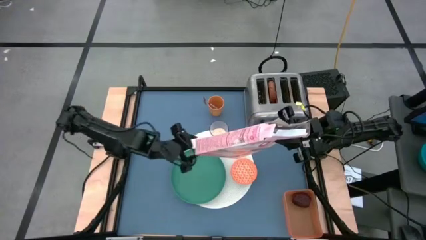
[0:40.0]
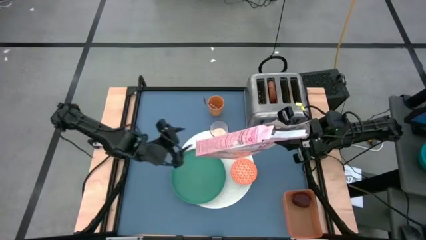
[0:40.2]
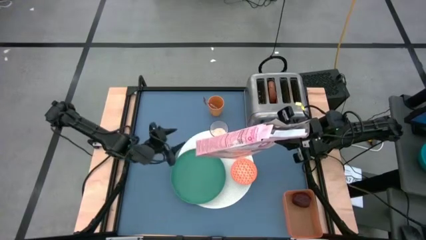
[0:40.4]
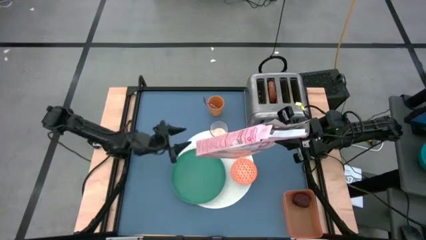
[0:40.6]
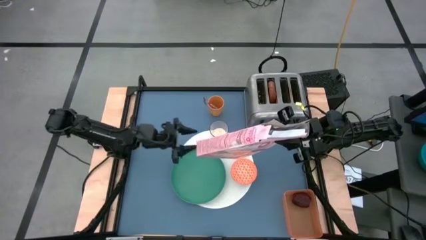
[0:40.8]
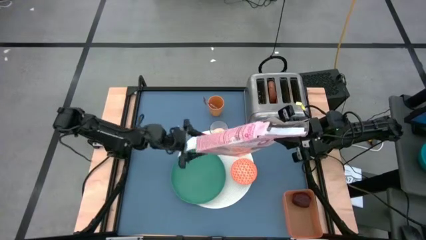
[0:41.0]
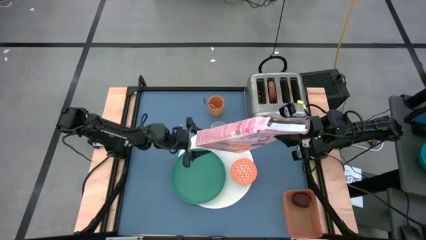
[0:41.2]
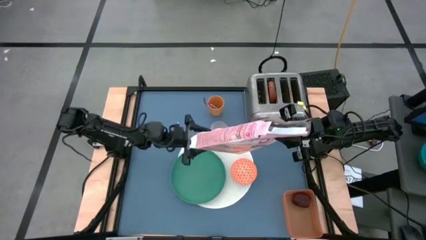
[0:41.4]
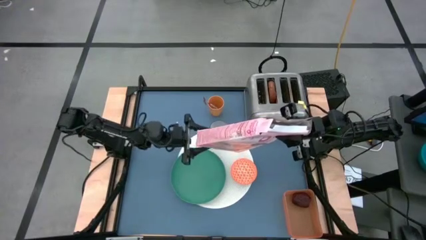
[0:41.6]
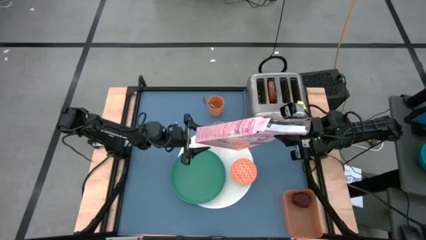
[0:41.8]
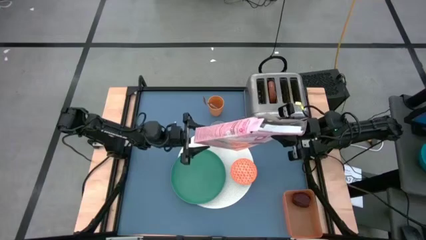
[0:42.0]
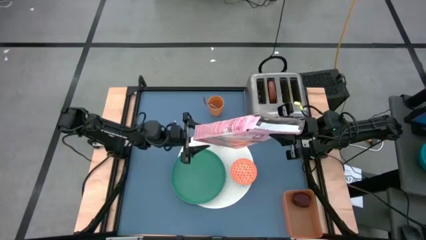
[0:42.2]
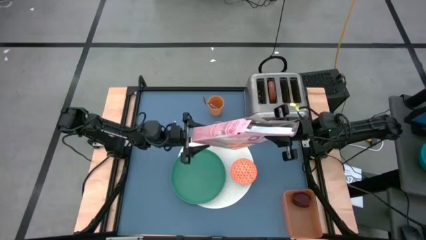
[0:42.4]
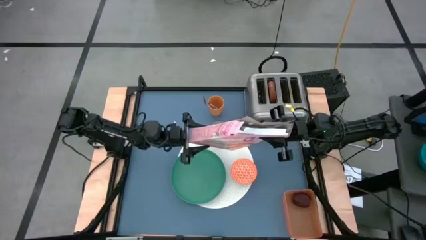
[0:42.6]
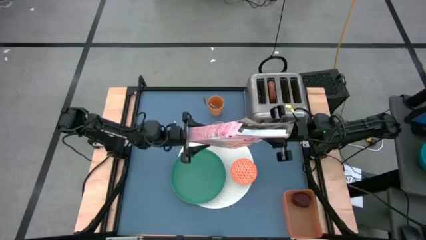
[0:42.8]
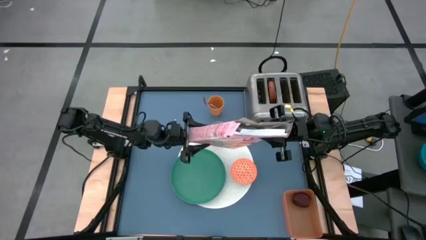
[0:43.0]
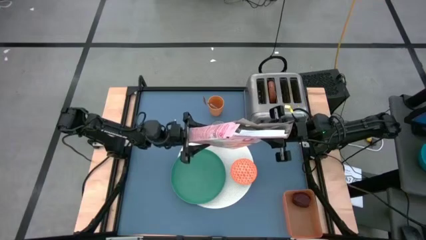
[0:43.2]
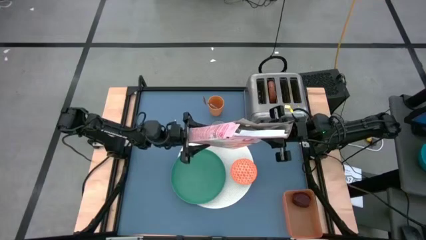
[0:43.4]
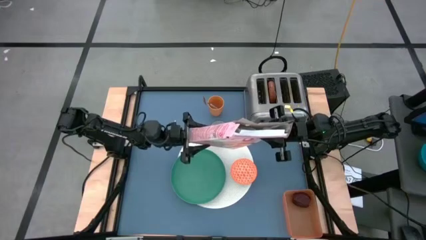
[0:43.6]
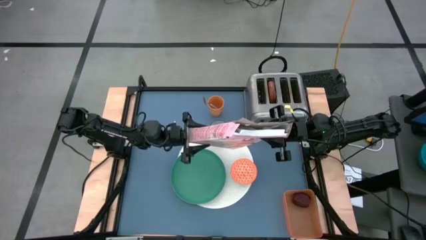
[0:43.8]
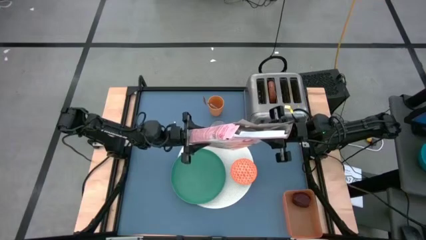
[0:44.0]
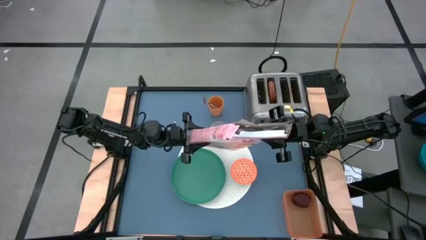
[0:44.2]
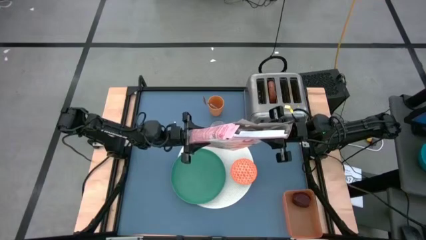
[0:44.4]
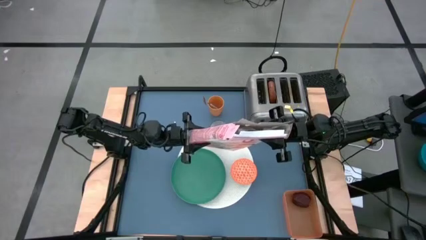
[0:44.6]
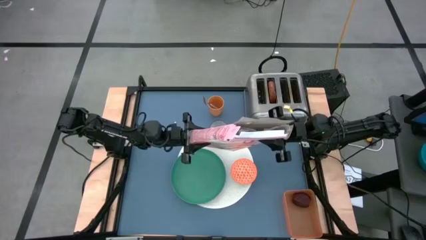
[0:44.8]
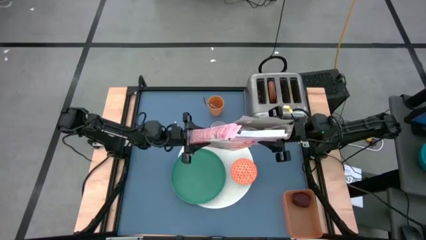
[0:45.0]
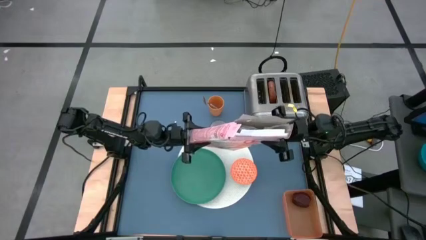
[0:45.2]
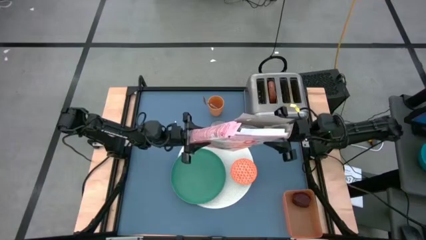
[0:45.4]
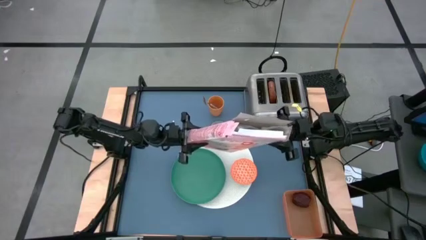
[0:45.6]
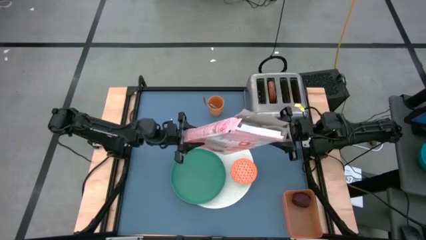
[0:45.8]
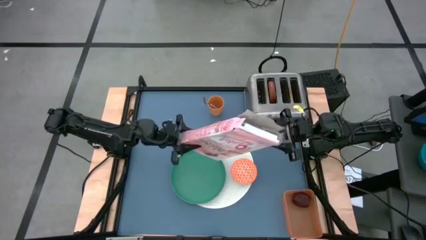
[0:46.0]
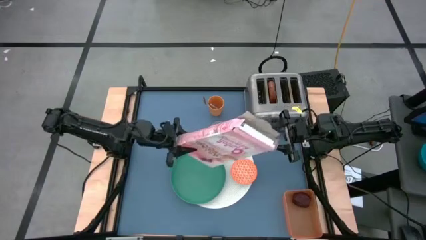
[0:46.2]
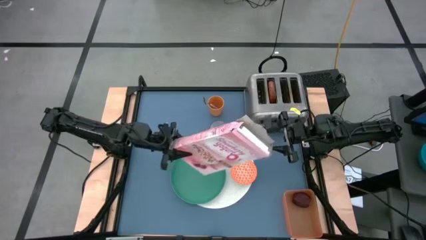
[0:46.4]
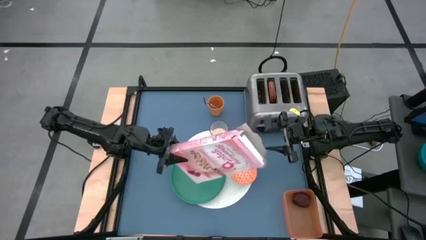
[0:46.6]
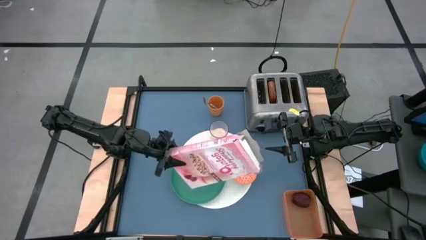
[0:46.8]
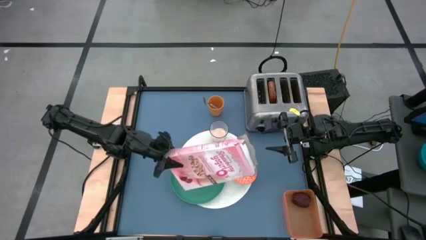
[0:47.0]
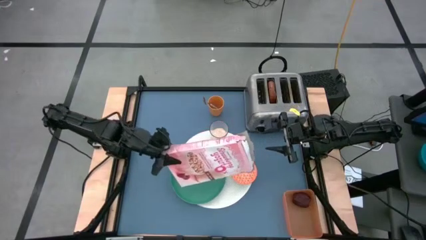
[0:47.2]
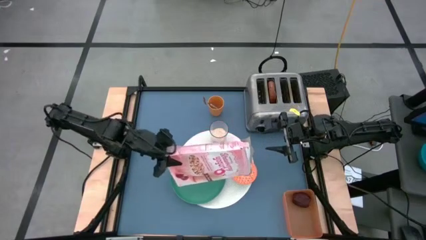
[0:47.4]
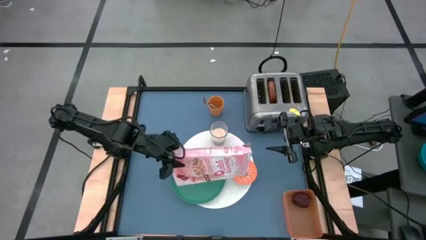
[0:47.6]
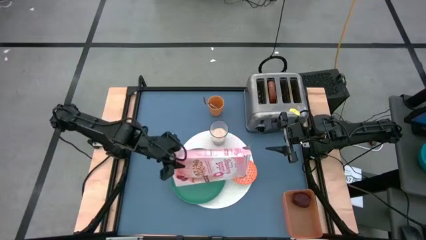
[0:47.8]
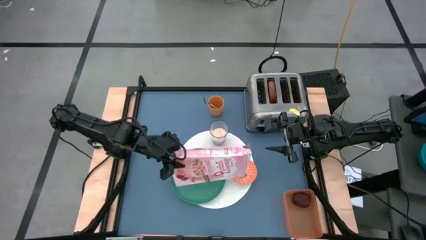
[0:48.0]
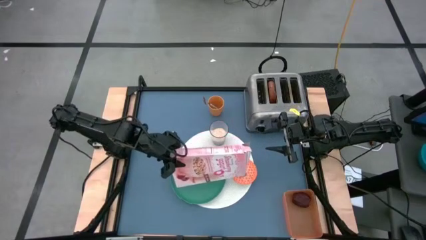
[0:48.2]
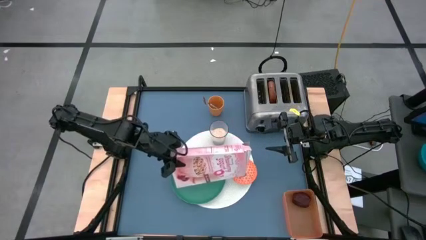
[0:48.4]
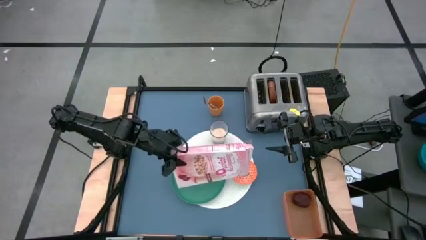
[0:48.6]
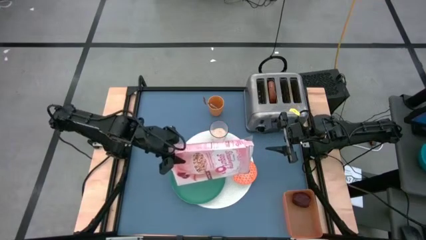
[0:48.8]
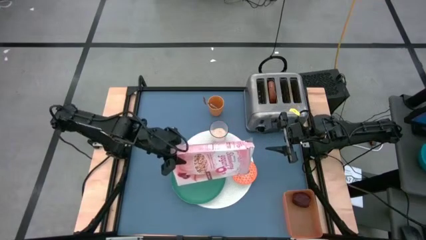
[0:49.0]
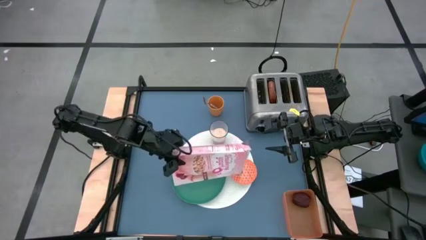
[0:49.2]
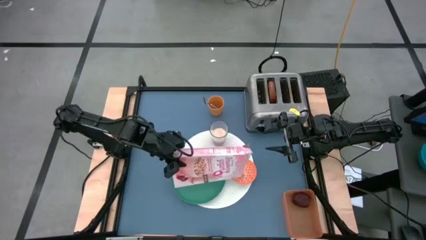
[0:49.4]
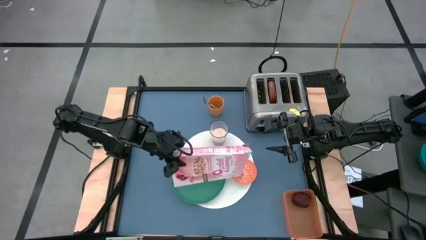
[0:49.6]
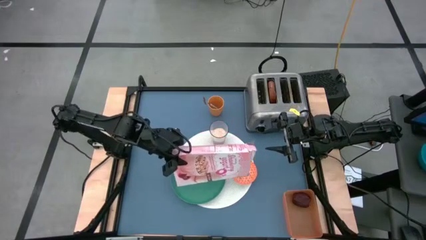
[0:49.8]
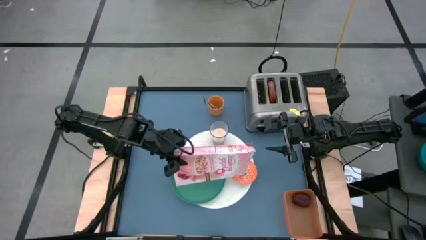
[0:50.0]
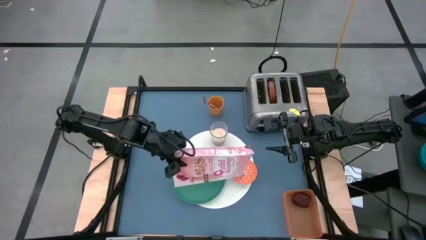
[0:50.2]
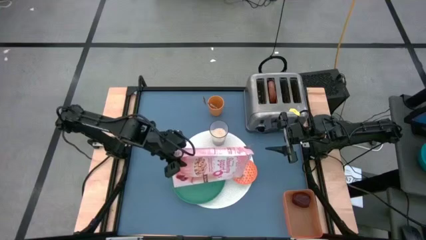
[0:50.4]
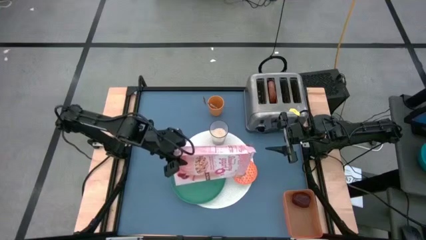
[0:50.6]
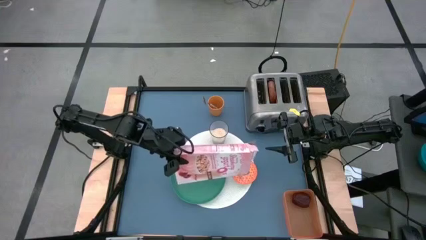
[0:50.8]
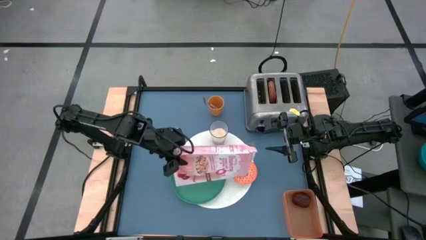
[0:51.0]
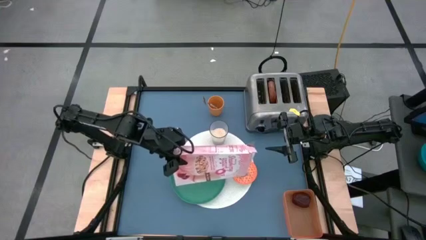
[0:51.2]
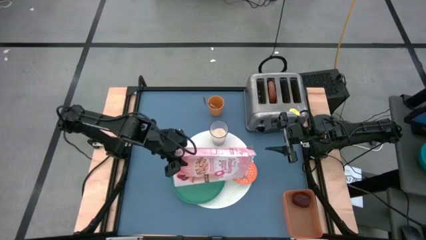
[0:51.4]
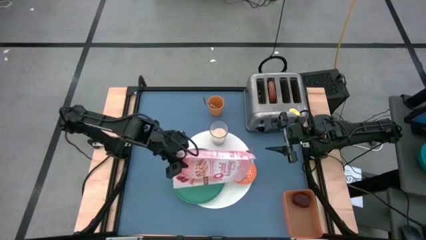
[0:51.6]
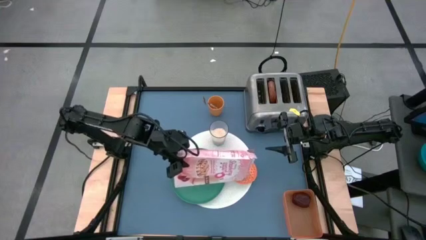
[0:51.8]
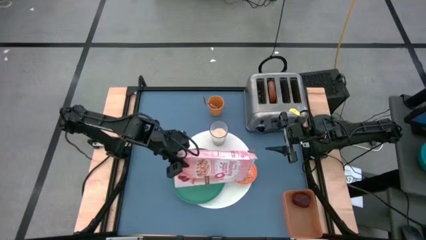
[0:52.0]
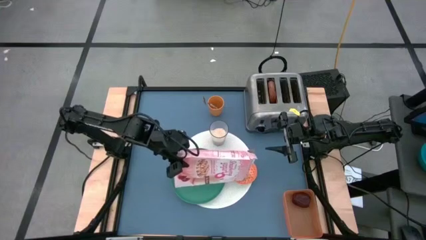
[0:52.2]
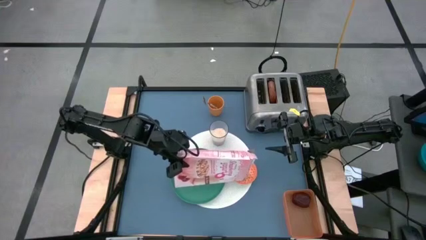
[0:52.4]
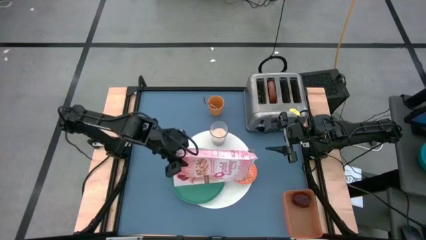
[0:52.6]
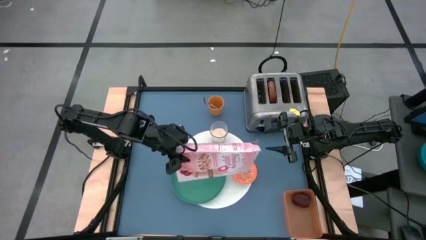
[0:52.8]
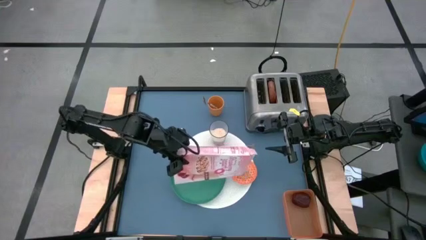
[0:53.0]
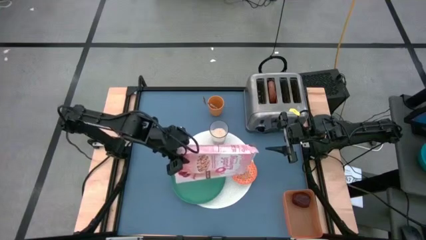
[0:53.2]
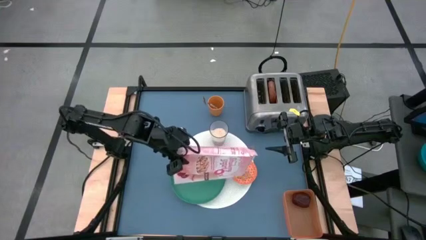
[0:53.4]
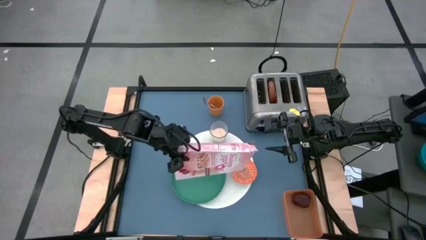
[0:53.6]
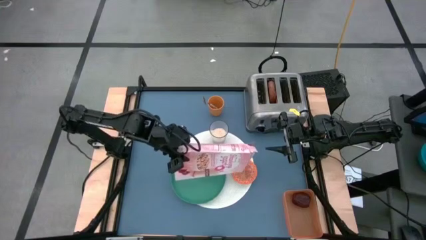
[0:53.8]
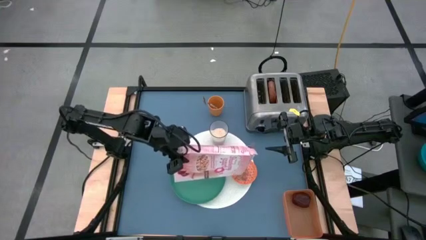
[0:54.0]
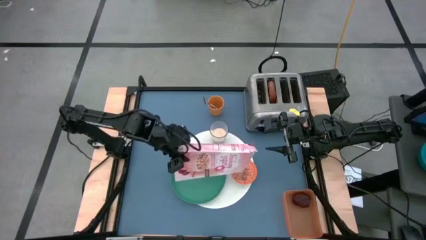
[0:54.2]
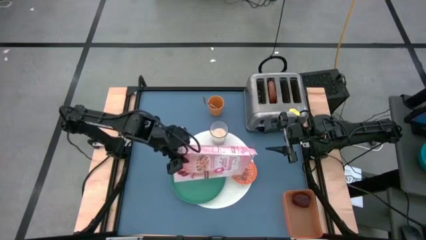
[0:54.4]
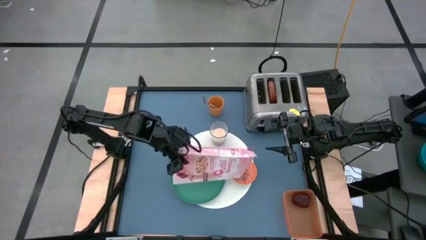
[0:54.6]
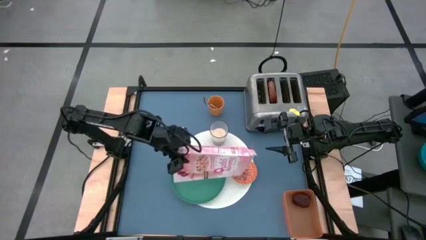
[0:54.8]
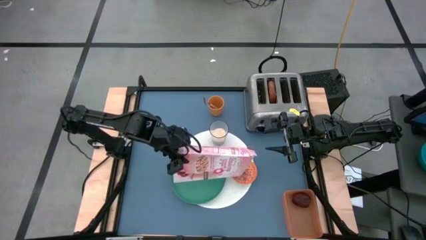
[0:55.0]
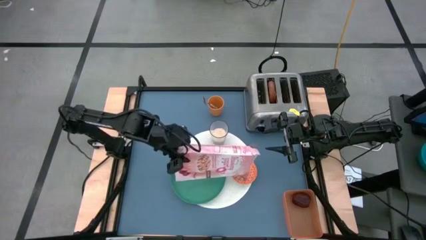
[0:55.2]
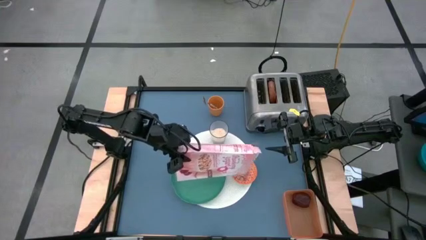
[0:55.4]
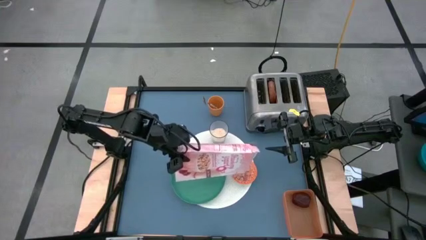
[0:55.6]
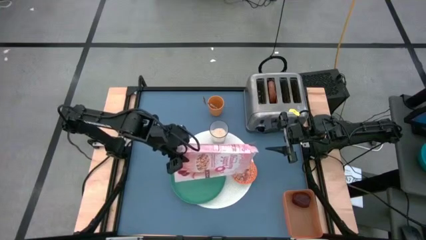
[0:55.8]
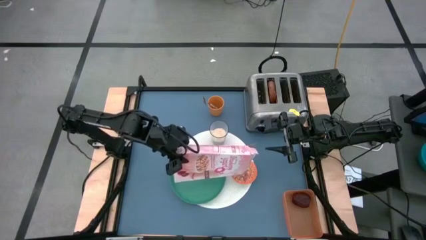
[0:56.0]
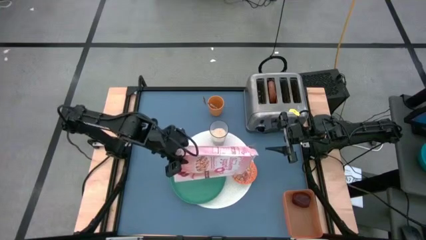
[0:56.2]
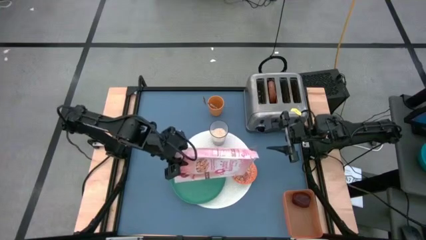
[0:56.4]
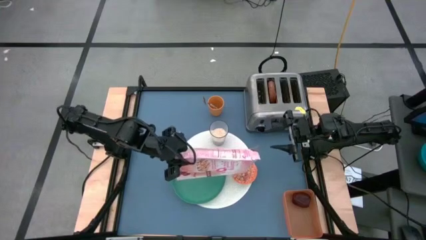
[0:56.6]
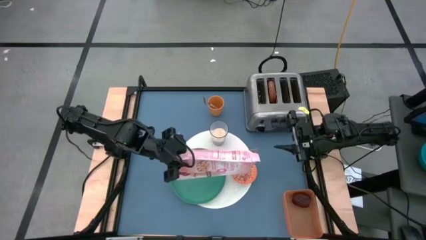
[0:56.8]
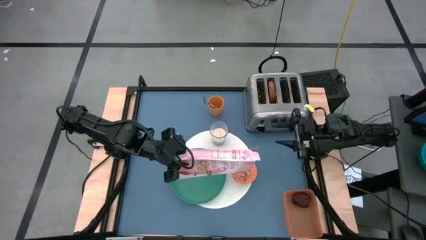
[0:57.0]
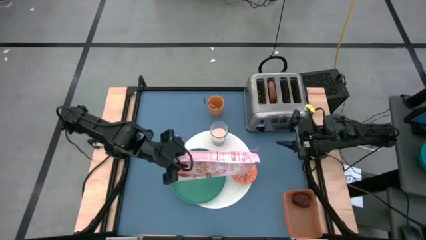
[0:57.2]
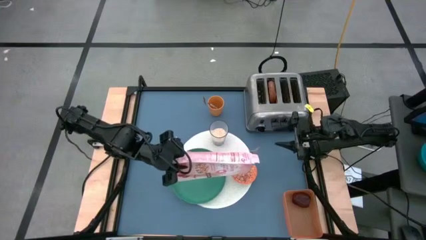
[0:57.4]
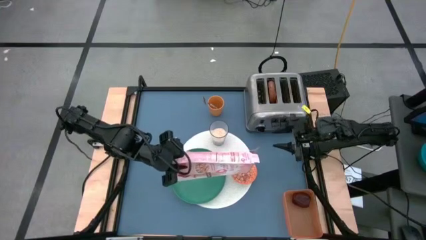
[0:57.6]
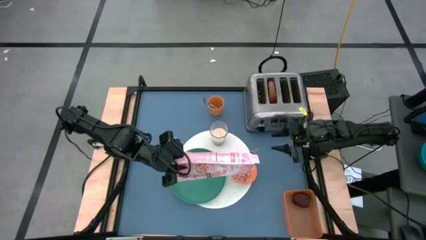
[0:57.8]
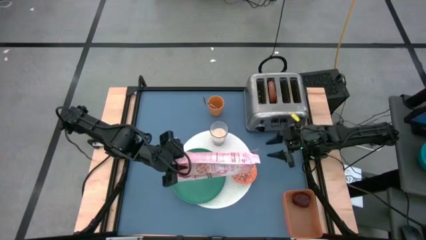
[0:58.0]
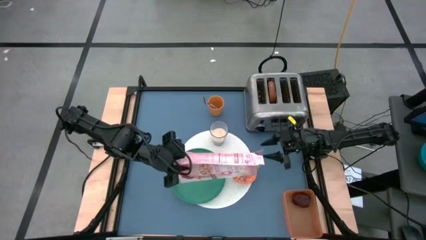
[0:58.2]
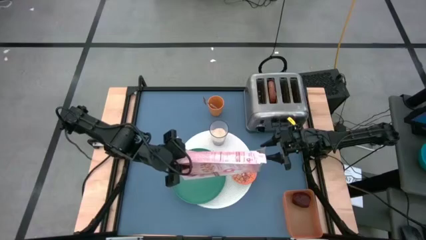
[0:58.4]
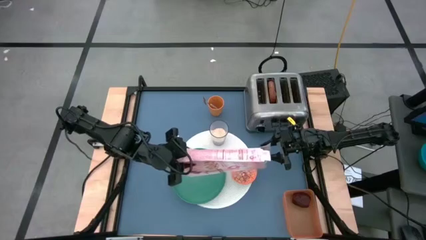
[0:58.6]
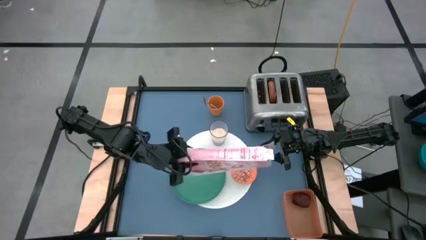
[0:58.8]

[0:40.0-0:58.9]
Task: Arrange a breakfast setting
Pour the cereal from the cereal box into the orange bowl
